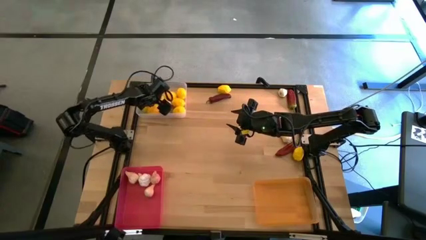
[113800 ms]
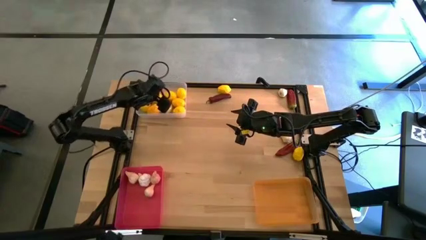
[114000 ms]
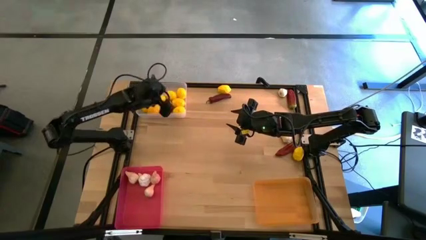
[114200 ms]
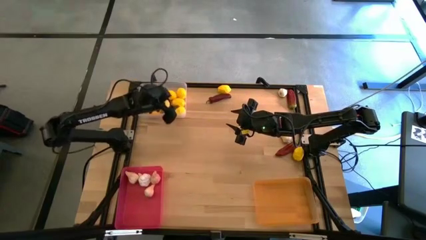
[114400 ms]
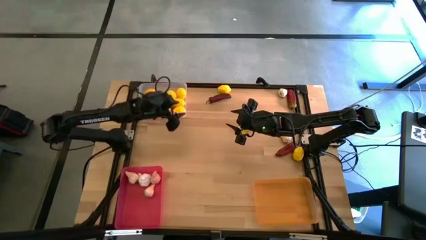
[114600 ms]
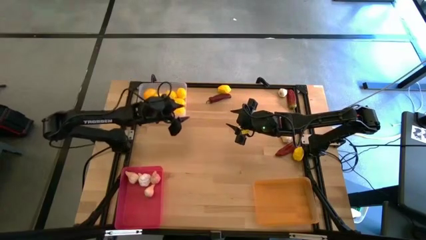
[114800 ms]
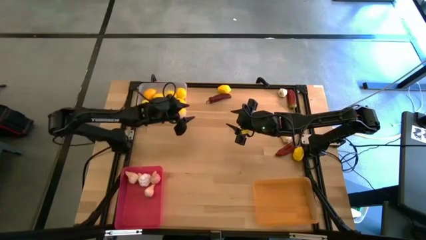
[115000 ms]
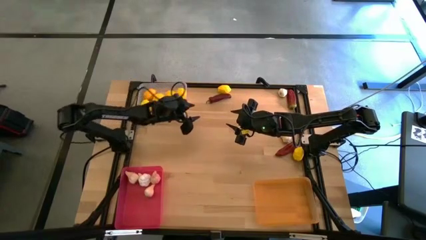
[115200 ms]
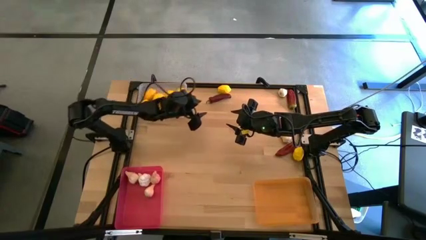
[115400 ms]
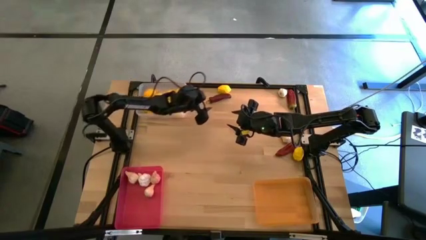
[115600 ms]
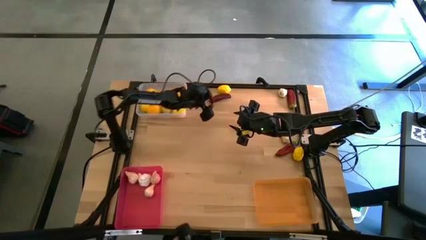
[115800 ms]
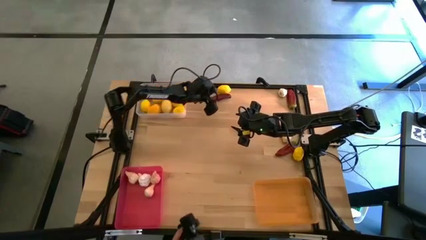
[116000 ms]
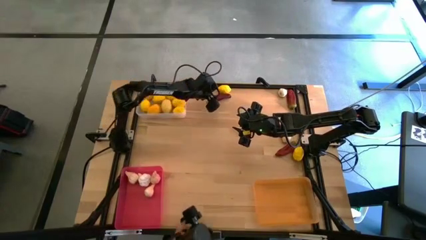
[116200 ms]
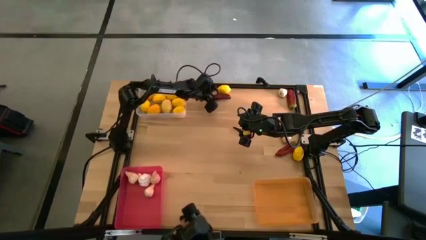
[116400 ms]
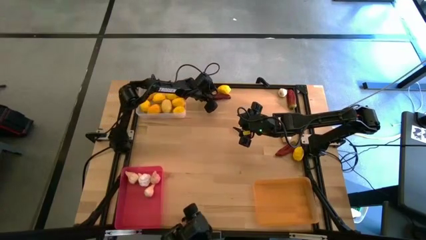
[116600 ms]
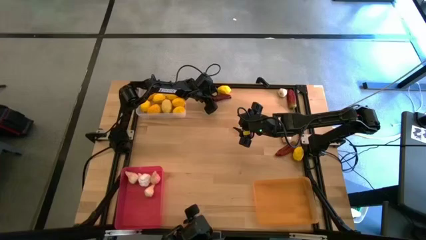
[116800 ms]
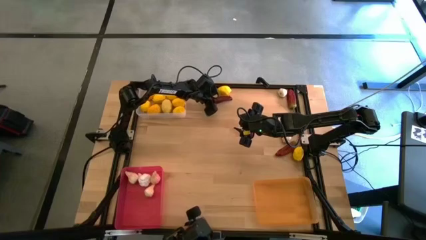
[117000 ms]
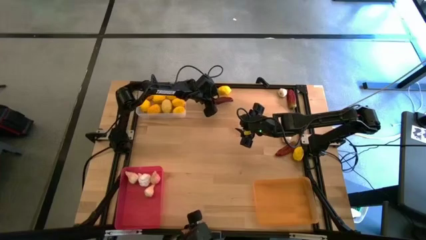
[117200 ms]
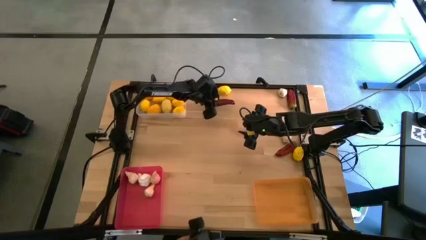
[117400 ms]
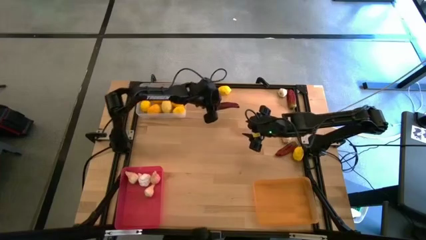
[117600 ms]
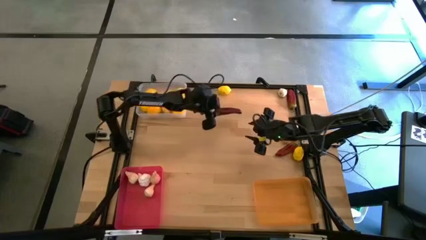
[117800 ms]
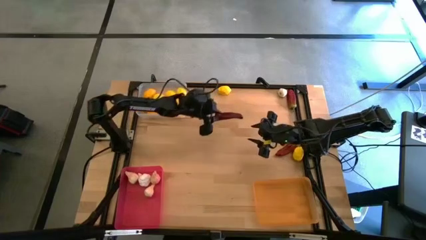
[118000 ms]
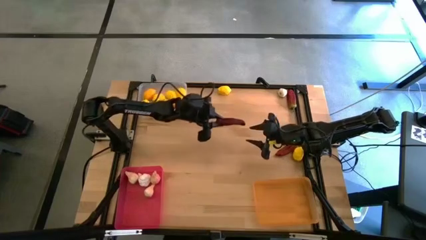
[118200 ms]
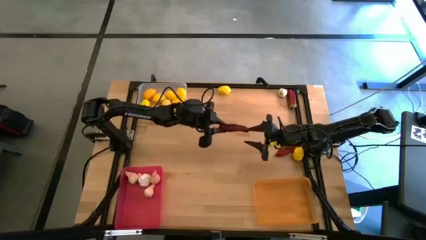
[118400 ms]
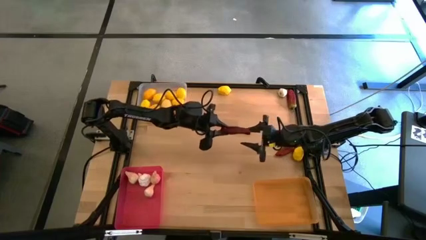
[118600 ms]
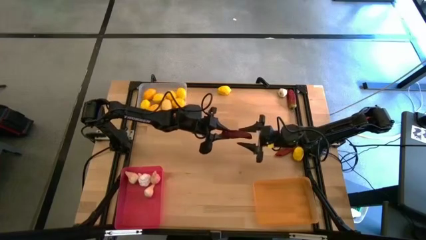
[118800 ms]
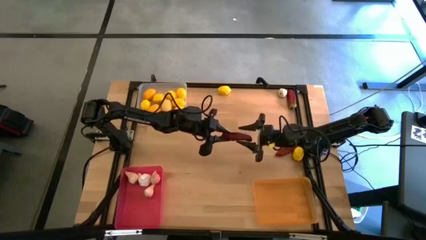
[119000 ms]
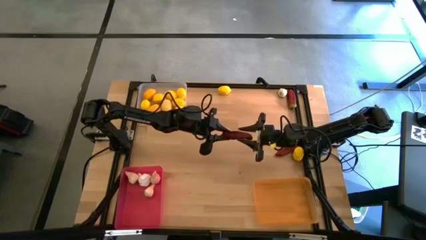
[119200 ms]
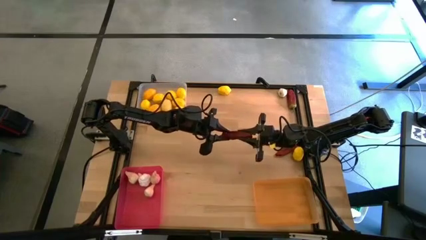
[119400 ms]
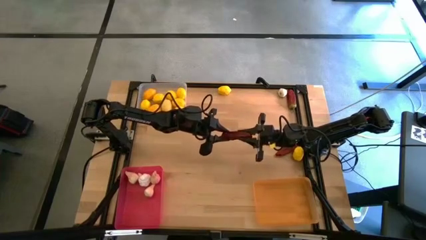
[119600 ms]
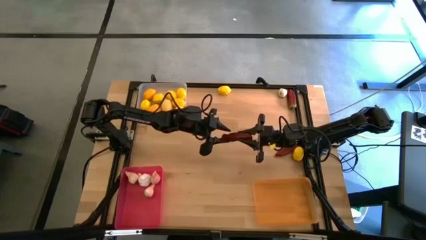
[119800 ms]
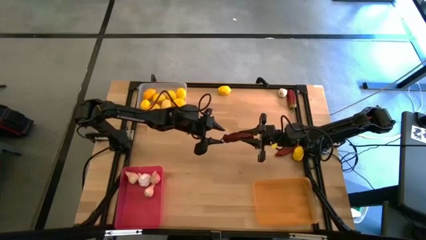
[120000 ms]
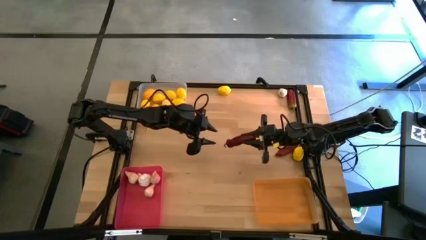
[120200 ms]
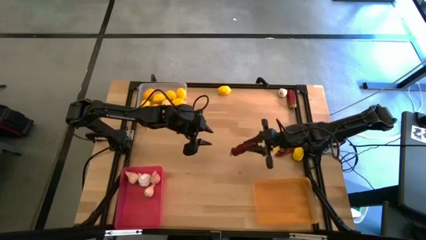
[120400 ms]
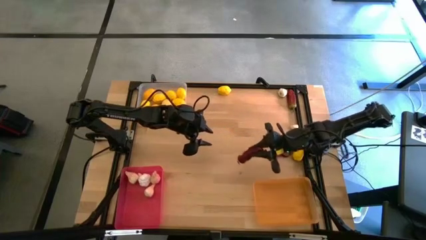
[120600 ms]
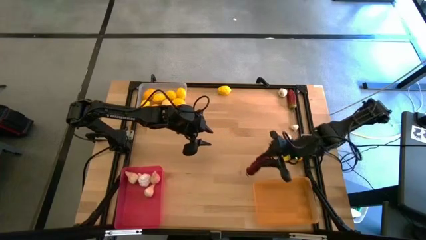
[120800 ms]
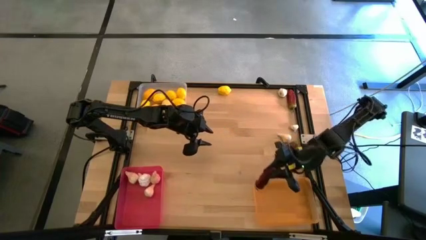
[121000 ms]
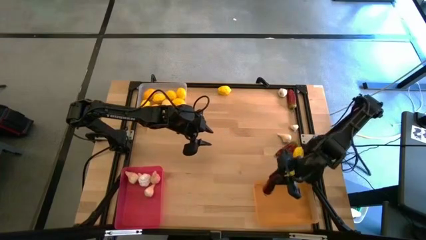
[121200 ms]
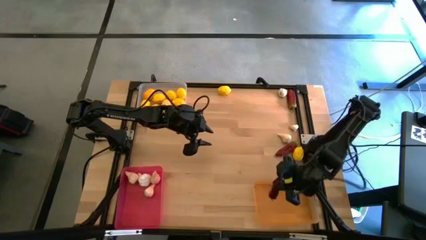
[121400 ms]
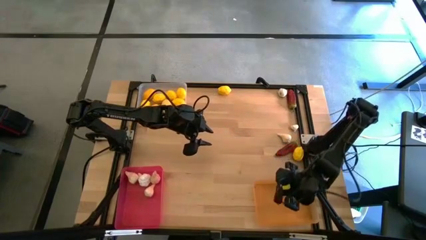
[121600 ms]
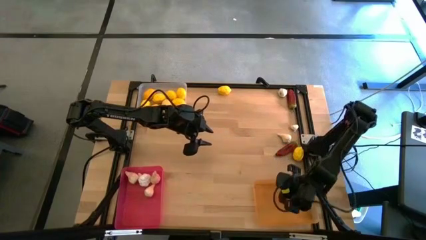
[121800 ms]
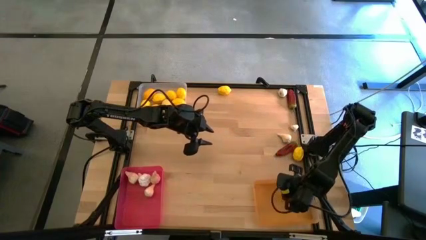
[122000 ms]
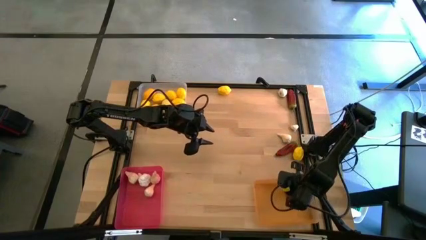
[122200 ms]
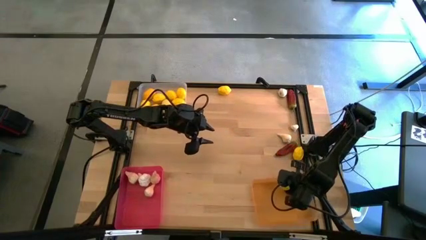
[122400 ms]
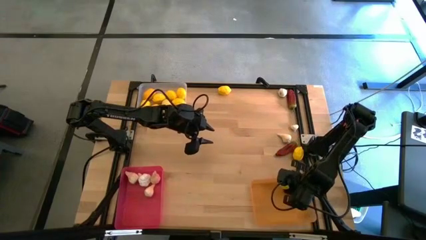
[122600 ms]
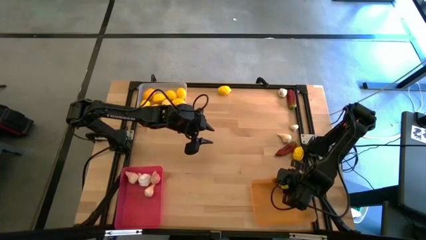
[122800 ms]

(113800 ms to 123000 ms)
Task: Sort produce into baskets
Put the red chili pepper into the bottom right orange bin

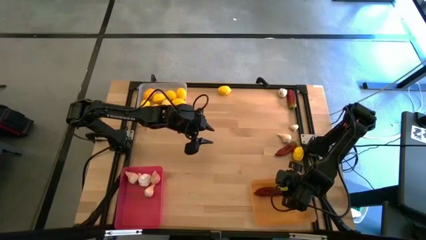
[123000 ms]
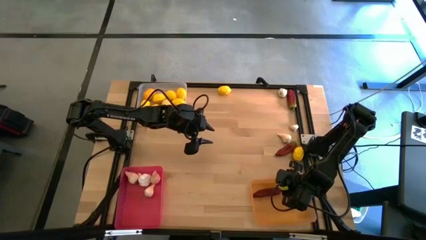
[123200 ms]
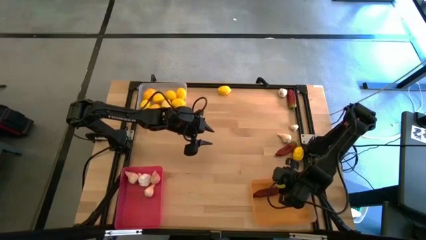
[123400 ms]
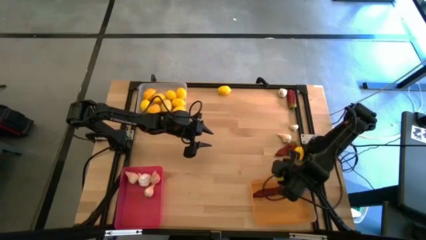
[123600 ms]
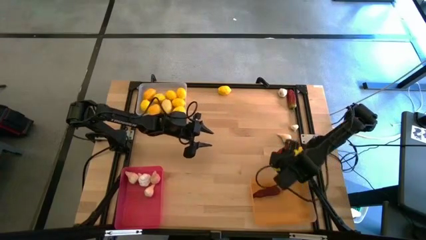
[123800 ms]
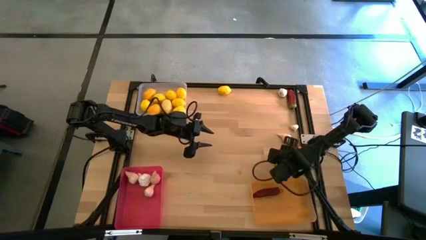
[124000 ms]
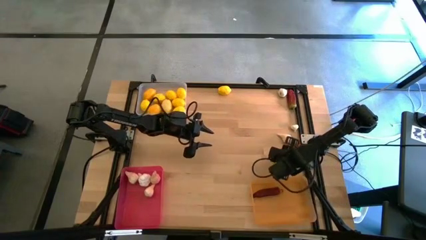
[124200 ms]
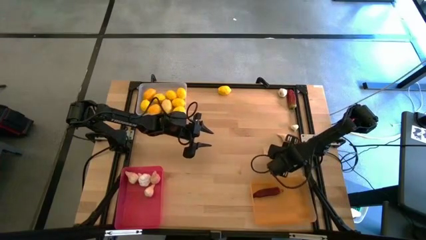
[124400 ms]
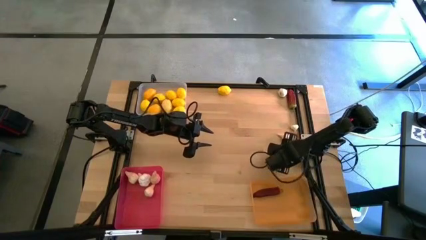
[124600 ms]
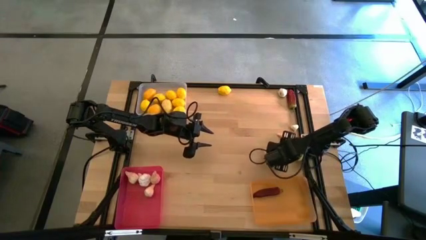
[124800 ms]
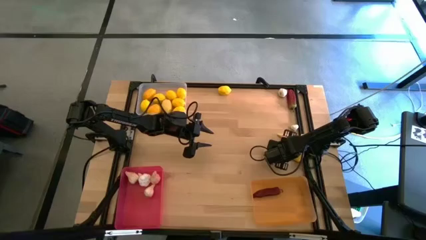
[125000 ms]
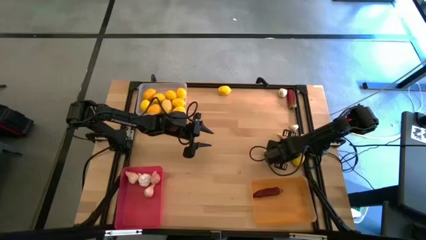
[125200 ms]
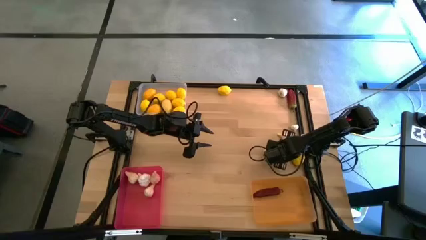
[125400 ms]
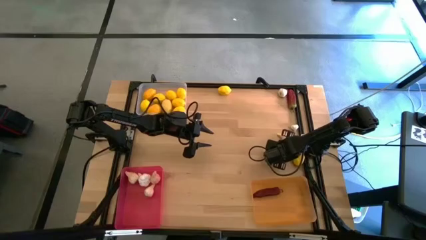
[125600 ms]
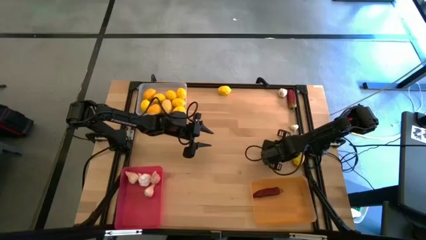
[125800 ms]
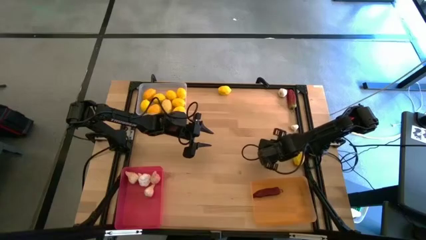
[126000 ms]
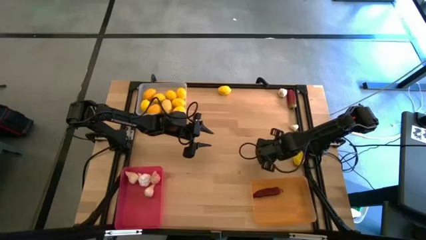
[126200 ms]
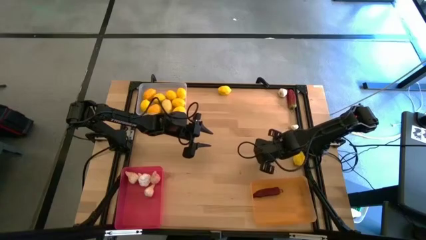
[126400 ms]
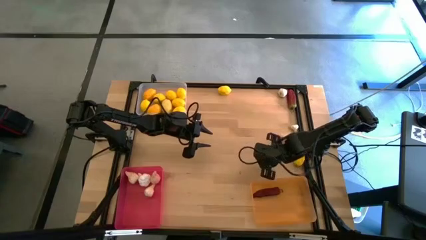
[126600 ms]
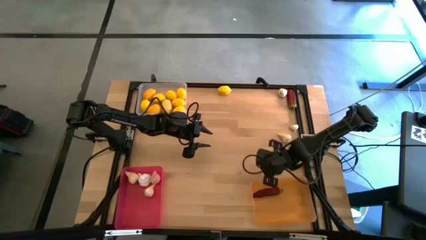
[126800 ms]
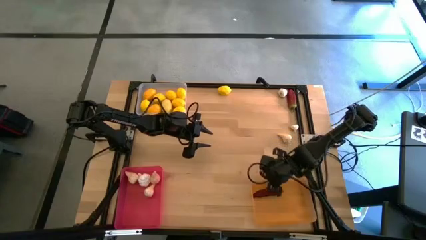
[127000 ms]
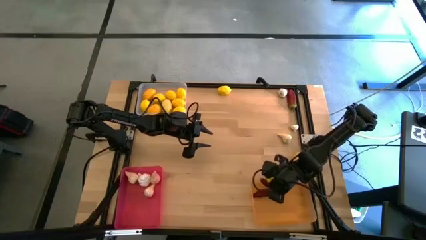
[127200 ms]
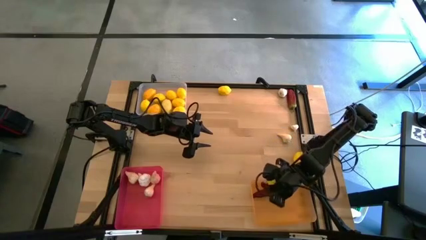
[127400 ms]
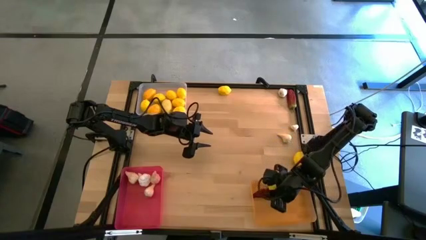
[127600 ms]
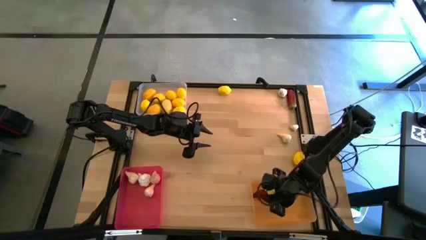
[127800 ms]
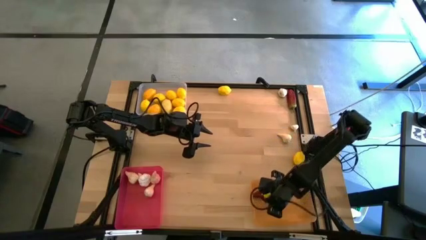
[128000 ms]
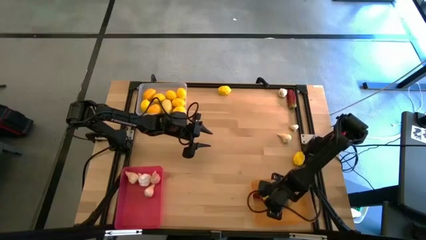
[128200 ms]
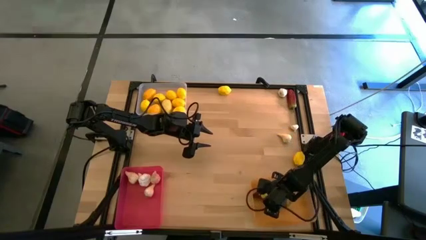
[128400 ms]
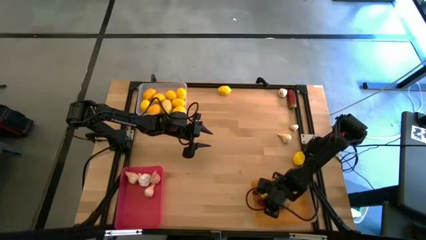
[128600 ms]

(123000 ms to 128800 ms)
Put the red chili pepper into the bottom right orange bin

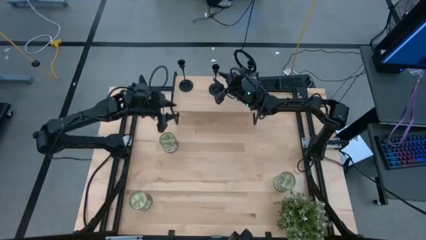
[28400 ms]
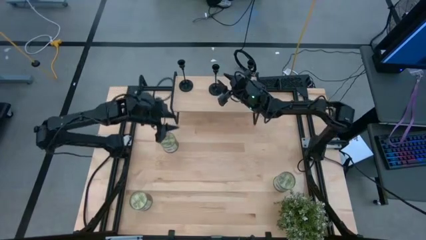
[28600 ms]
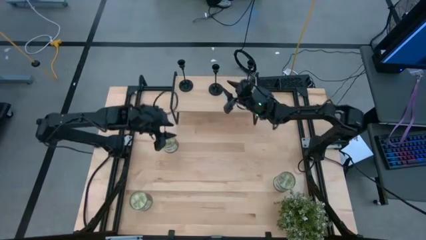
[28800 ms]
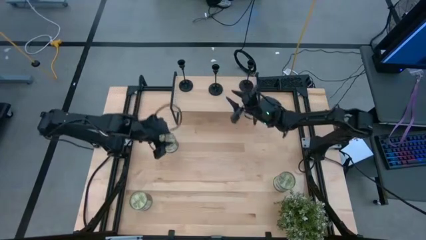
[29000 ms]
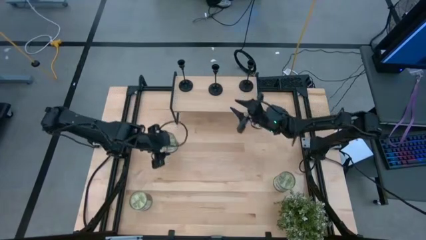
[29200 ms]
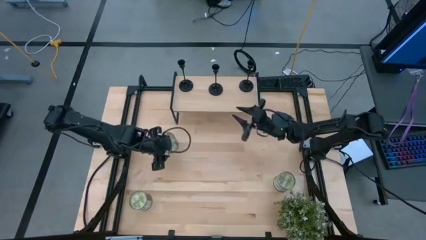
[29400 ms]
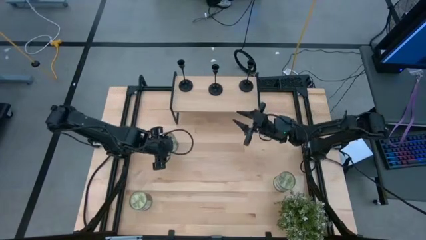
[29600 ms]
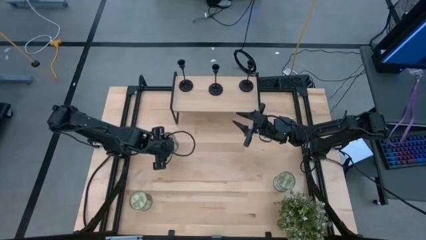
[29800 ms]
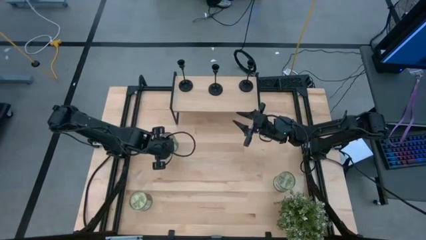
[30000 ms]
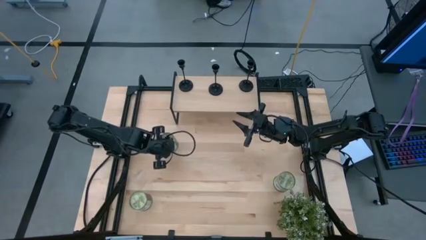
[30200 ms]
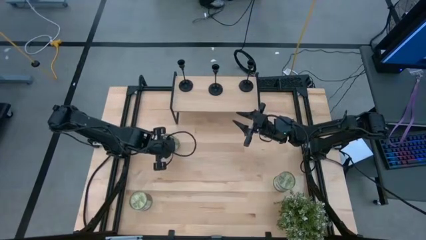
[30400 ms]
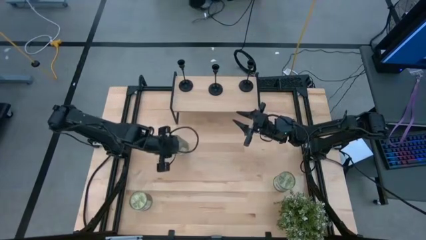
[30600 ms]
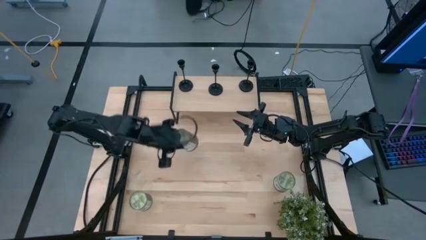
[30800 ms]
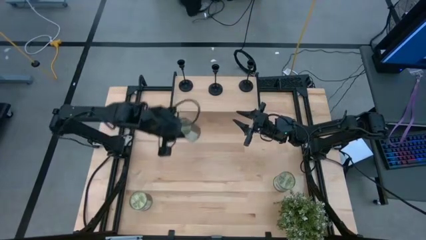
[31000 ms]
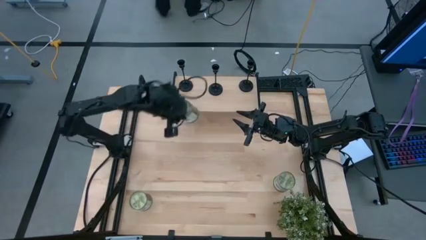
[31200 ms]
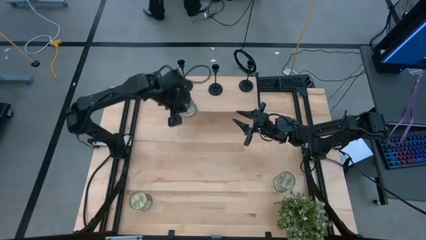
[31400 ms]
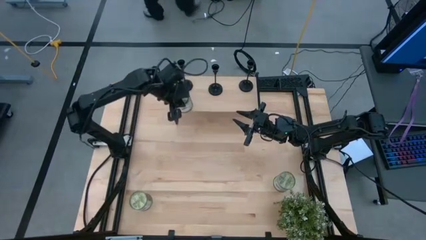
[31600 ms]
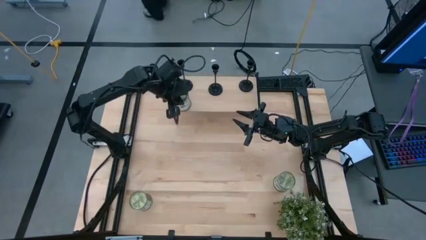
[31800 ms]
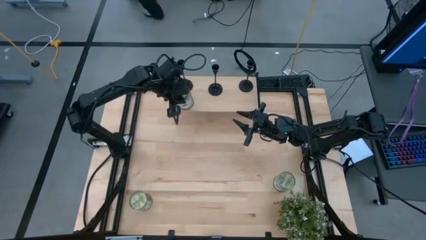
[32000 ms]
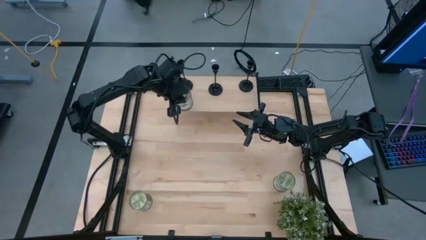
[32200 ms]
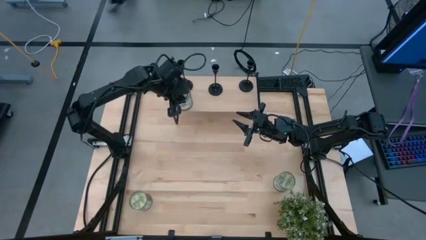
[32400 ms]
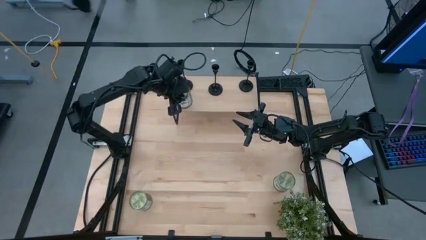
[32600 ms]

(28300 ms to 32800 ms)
Task: Pick & Place candle stick holders
Put the top left green scented candle on the shelf
